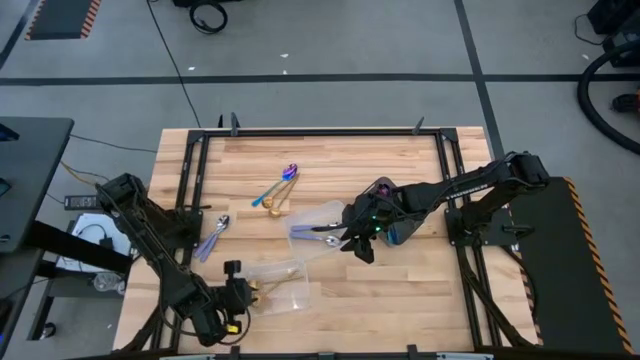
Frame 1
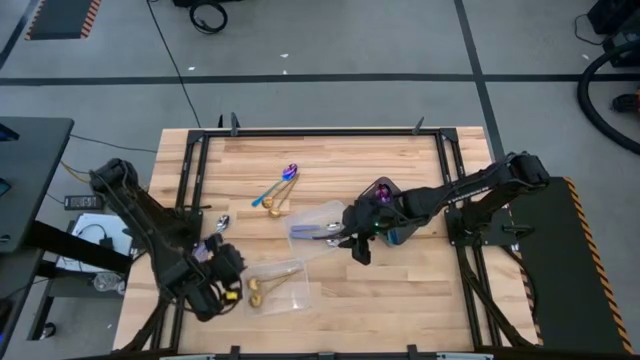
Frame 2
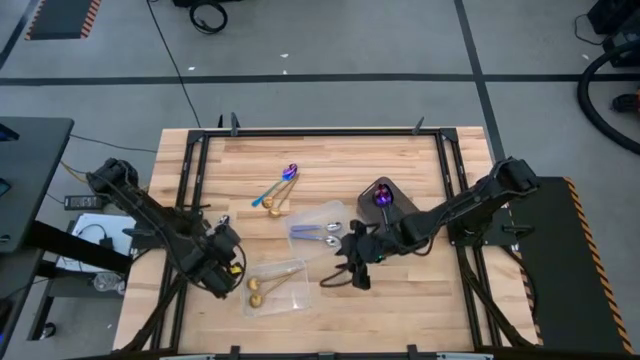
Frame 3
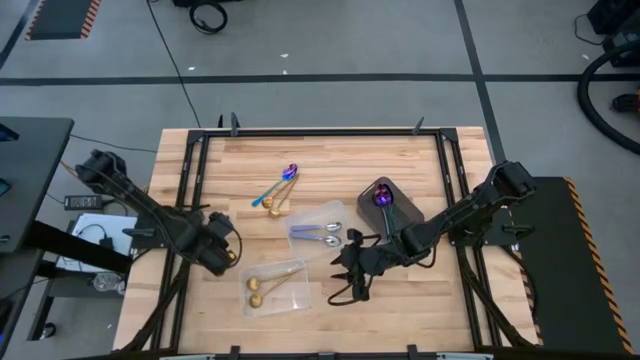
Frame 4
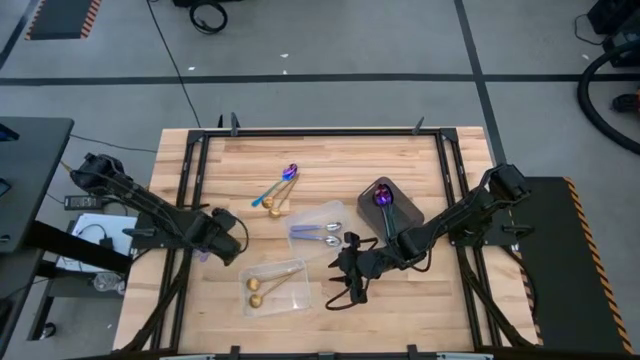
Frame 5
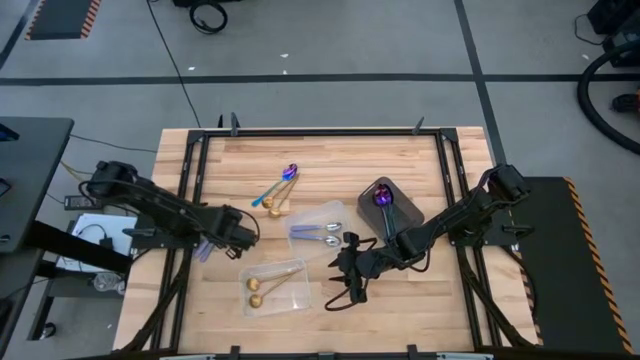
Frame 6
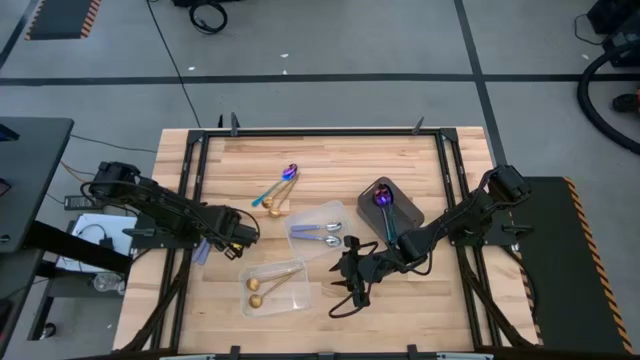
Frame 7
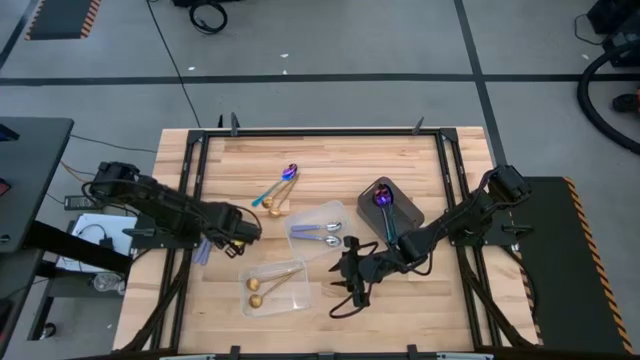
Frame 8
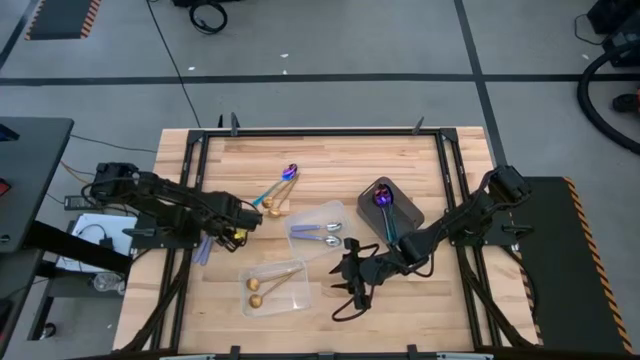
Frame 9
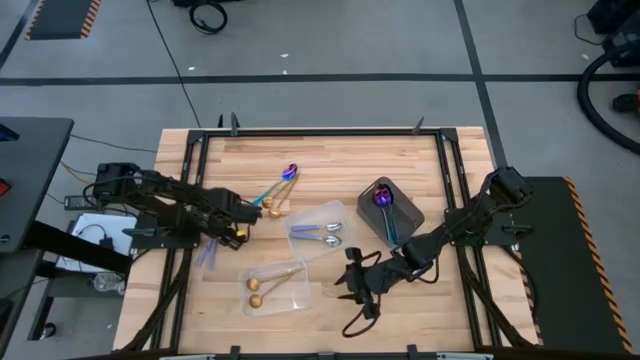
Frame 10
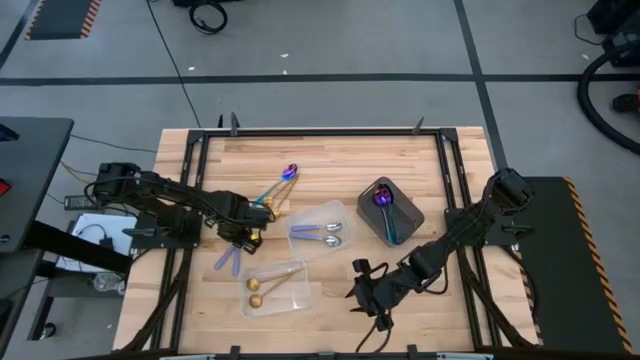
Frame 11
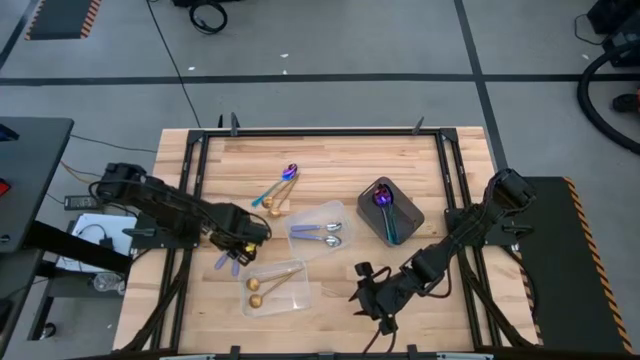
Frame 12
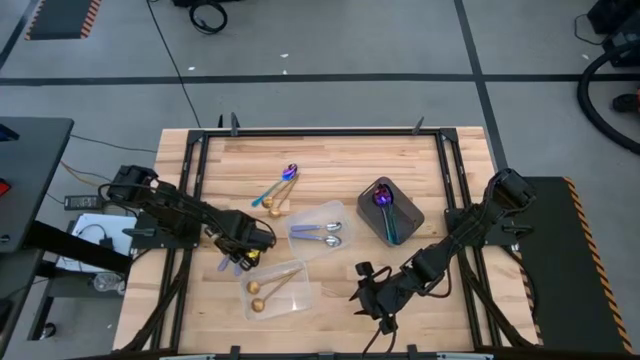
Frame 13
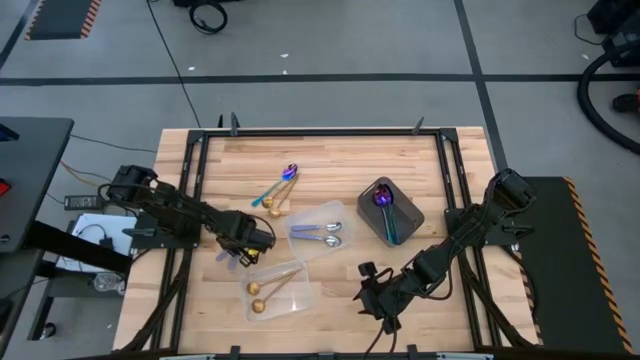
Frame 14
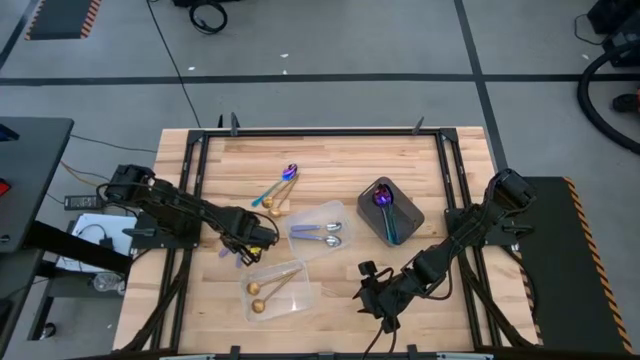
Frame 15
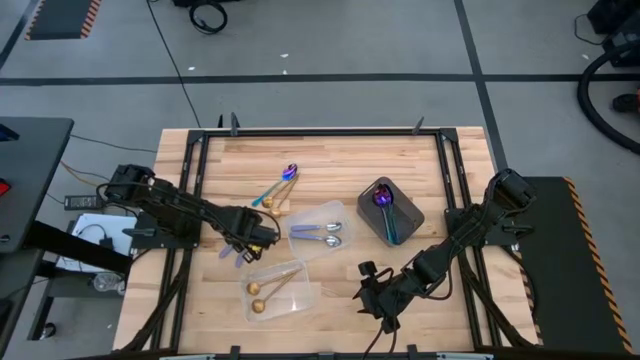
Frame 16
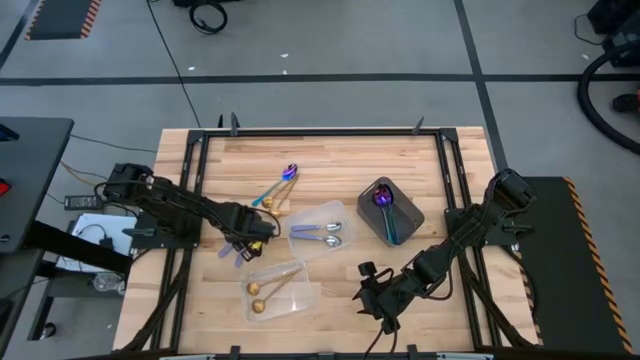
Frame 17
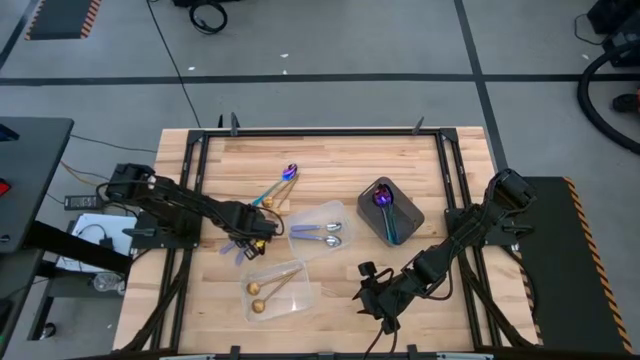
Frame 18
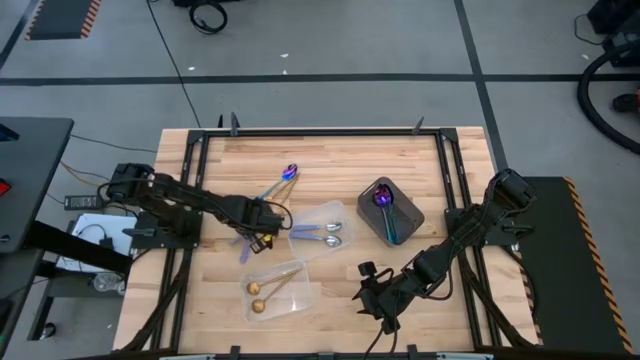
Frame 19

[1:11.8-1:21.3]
Task: Sort silverware by color (type)
Put the violet spoon into the top transparent bin

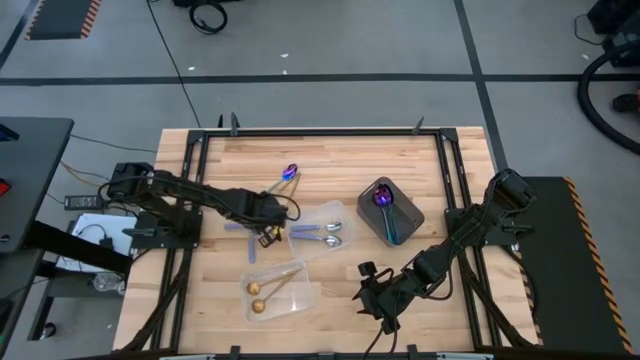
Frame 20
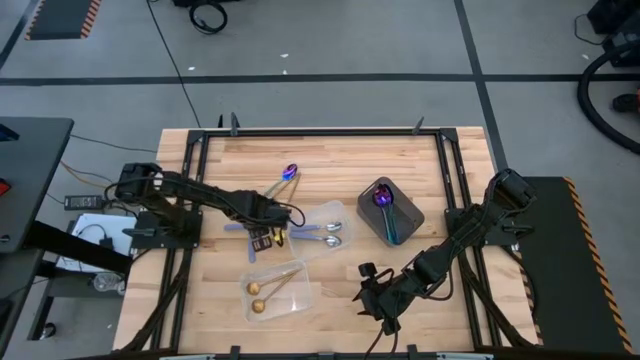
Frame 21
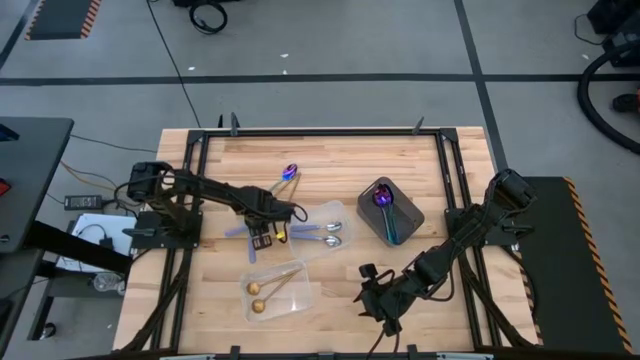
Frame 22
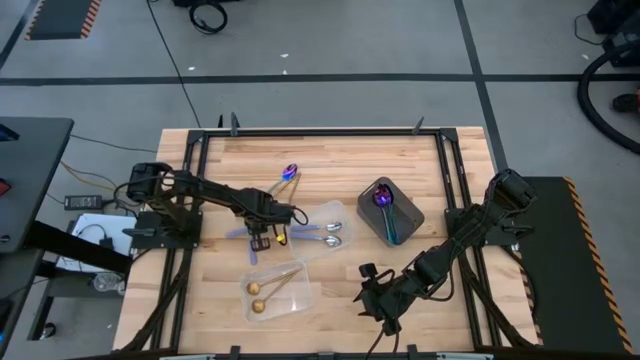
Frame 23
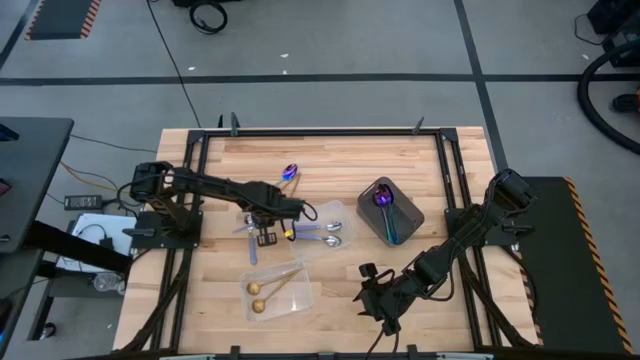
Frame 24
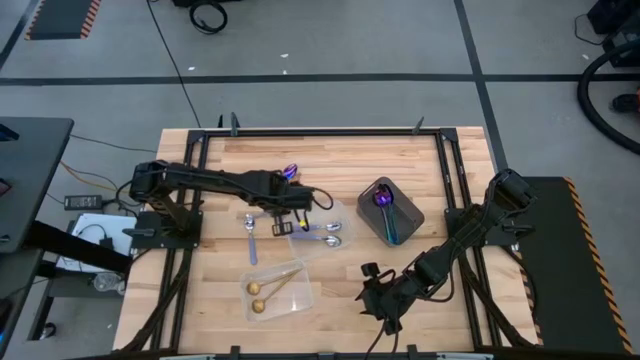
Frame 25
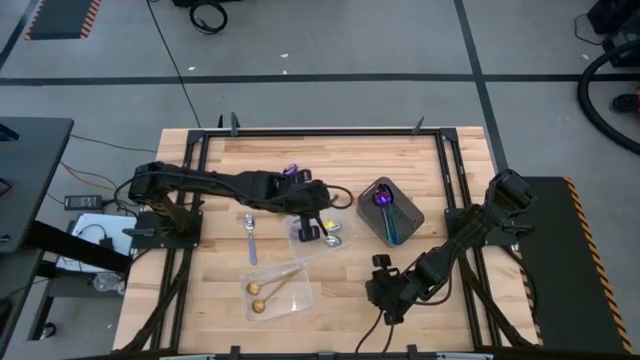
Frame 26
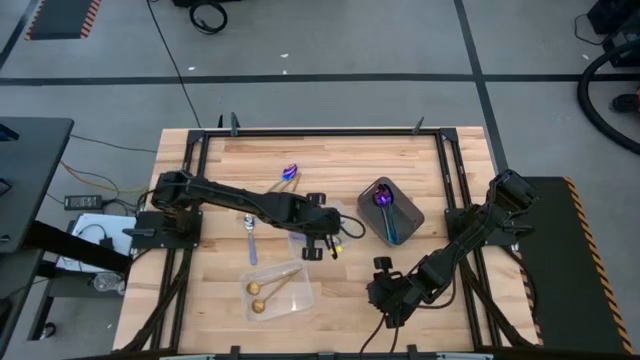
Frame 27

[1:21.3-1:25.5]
Put the violet spoon into the top transparent bin

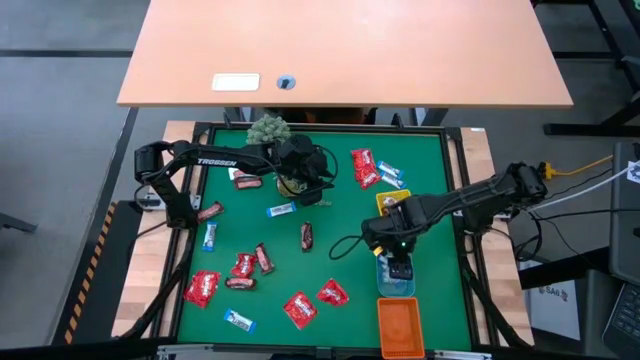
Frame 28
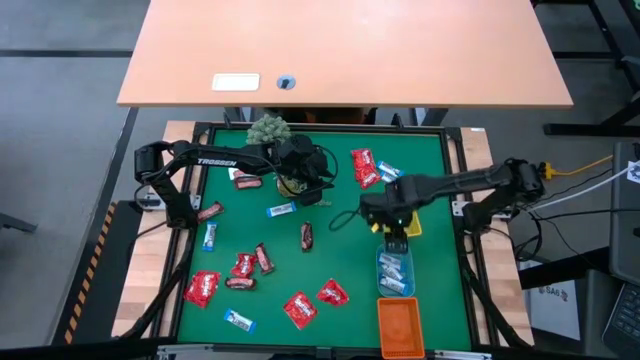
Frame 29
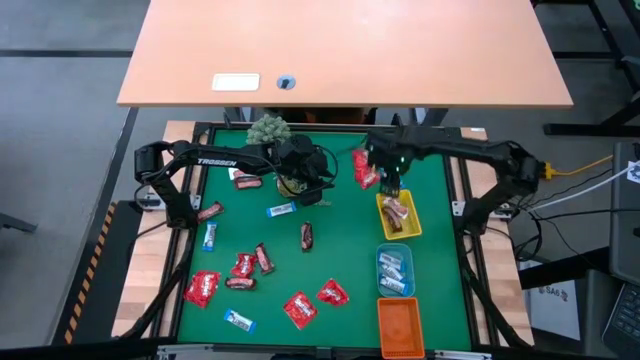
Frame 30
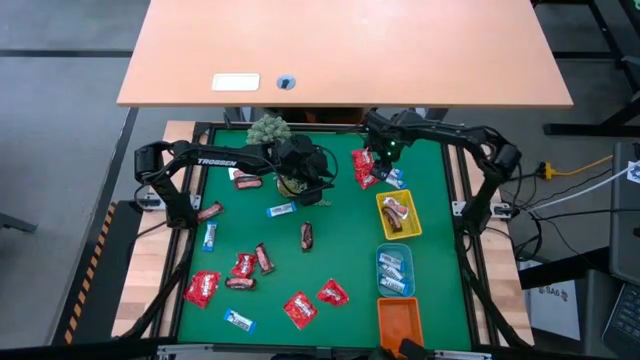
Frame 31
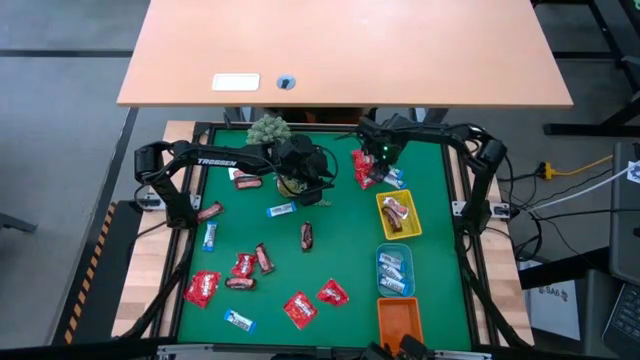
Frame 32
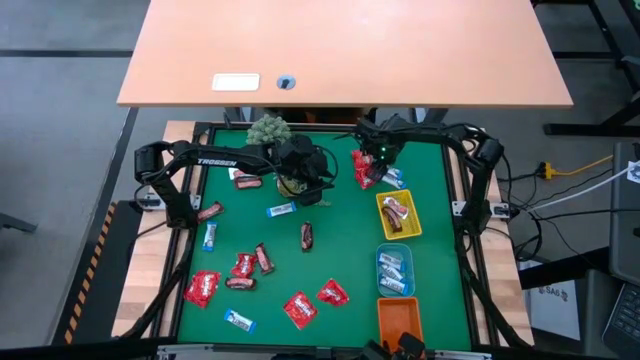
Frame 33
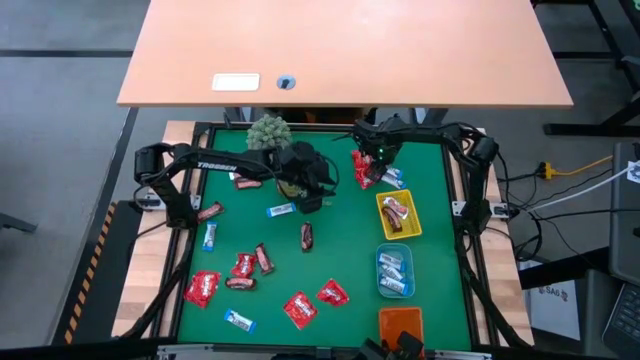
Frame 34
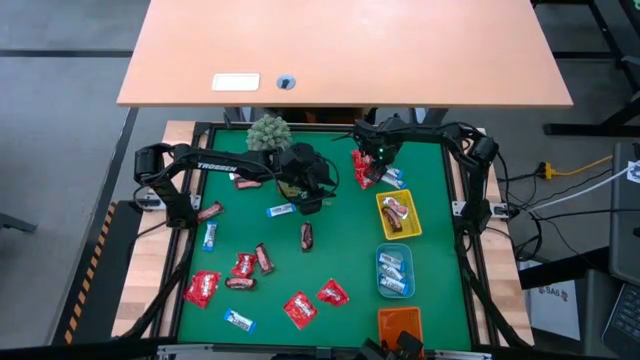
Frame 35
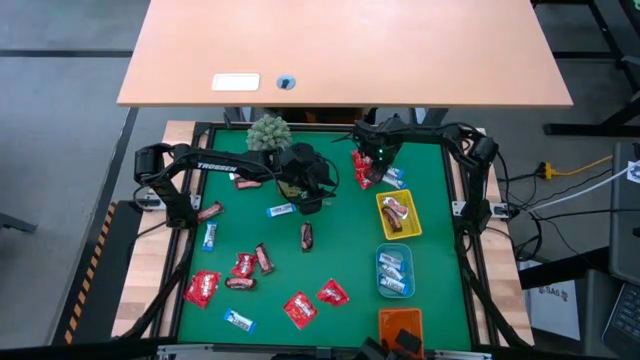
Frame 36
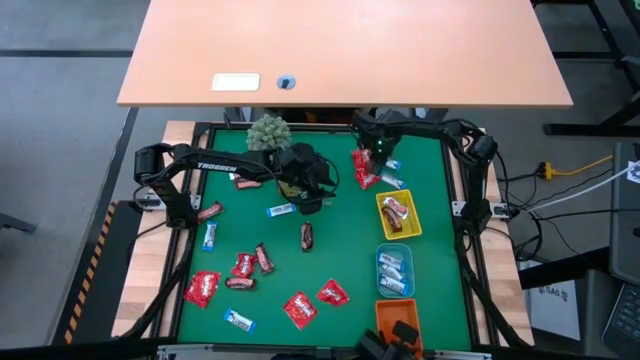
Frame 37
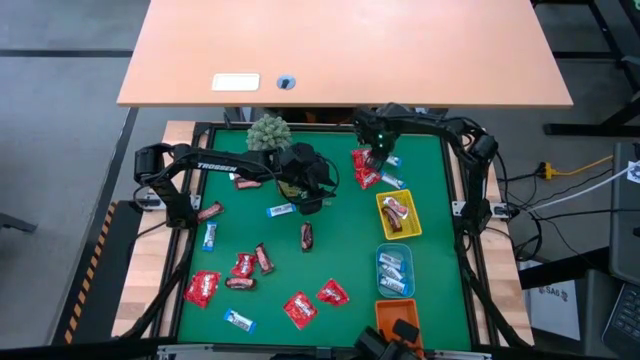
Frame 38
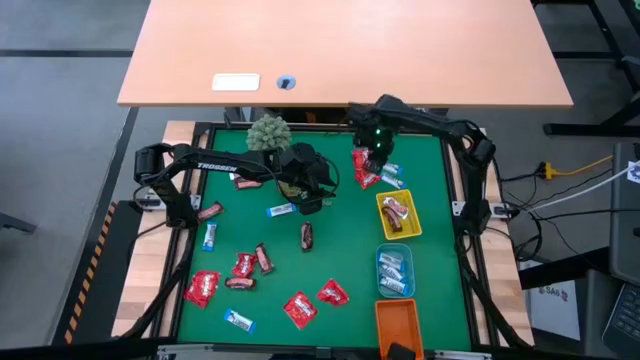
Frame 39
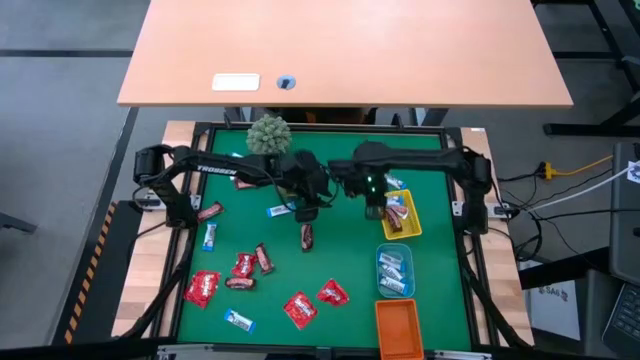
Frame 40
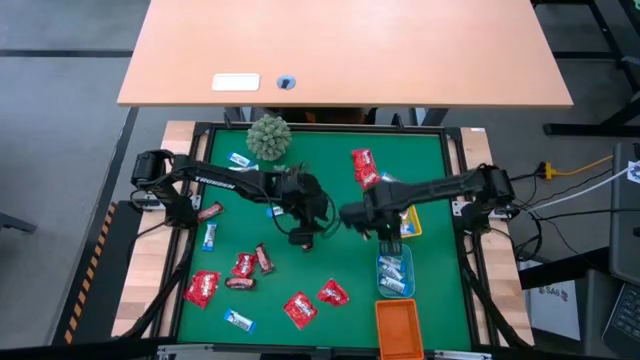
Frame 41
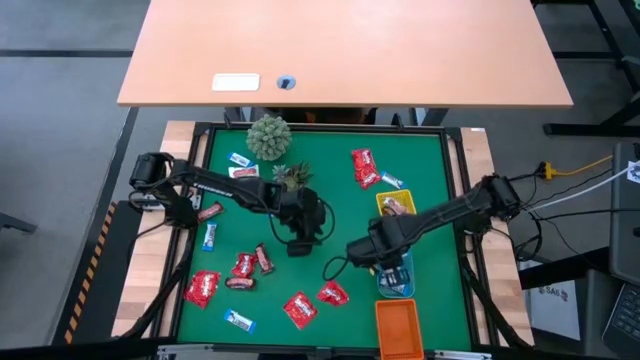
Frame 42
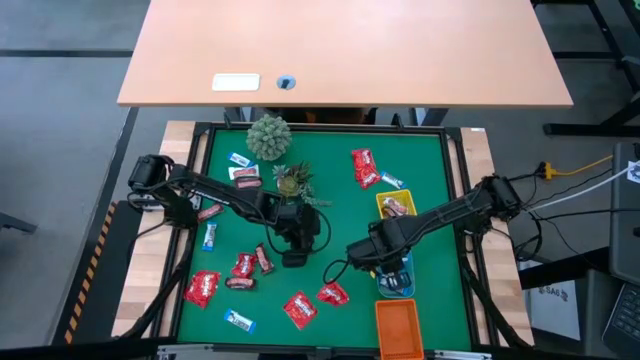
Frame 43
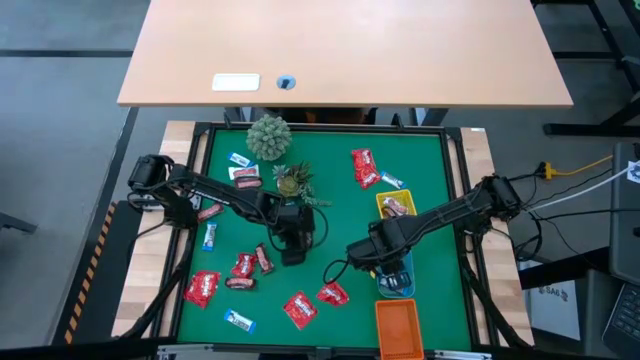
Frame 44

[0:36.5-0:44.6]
Task: Sort candy
Put the white chocolate into the blue bin
